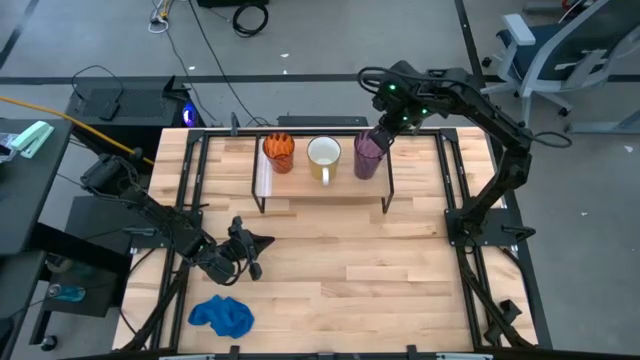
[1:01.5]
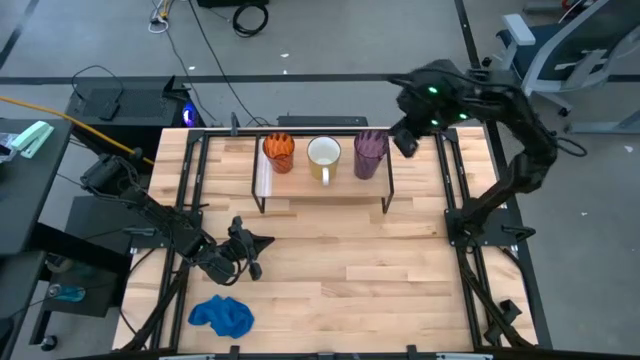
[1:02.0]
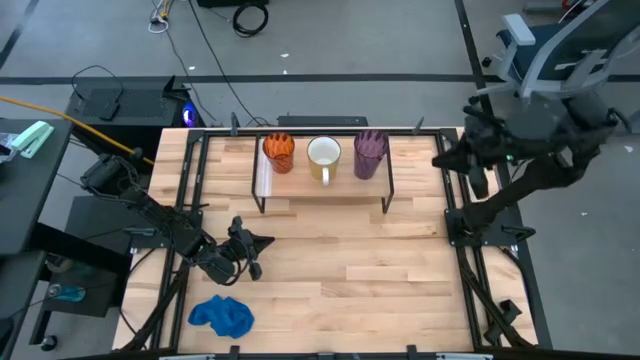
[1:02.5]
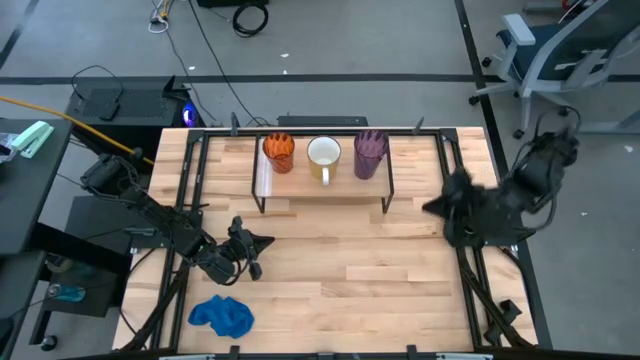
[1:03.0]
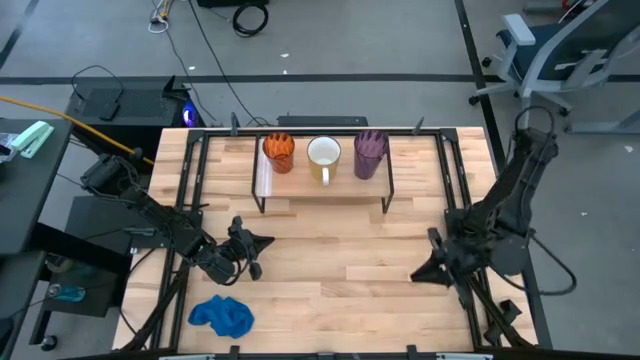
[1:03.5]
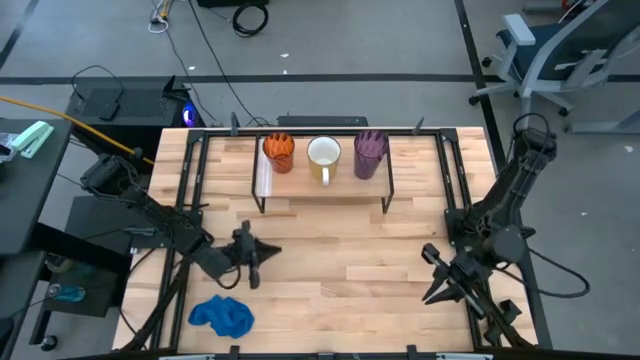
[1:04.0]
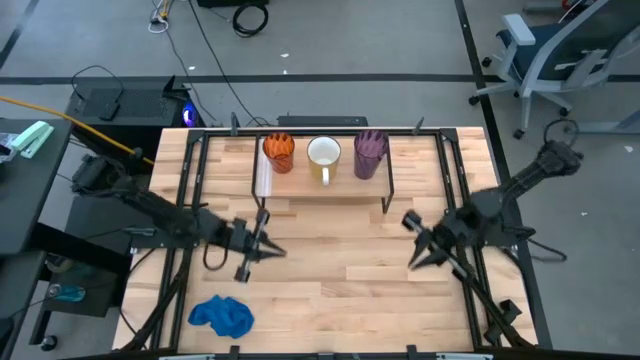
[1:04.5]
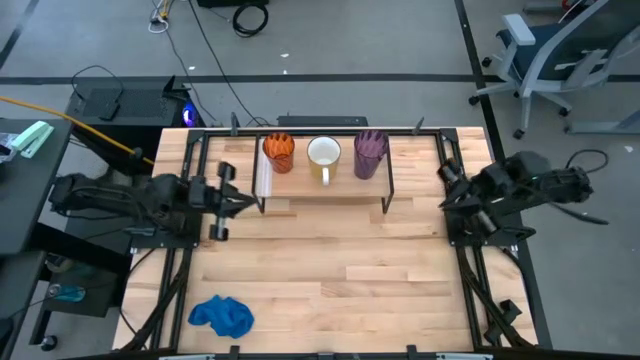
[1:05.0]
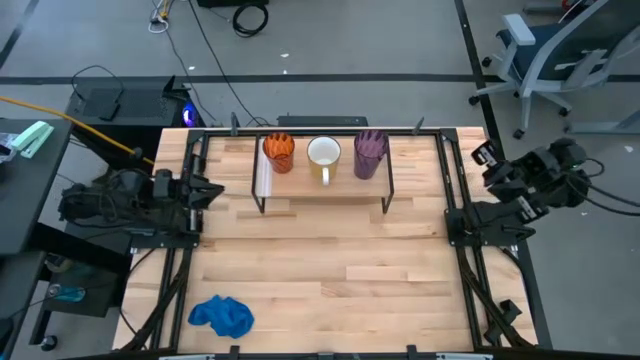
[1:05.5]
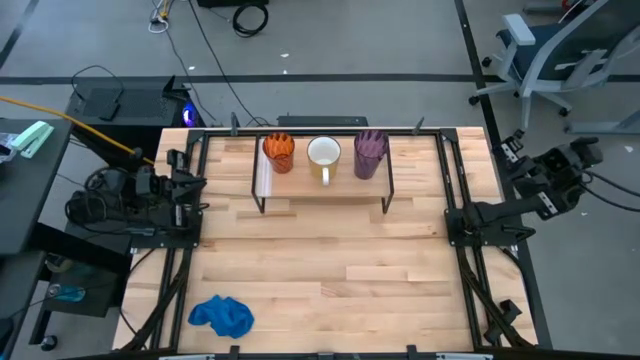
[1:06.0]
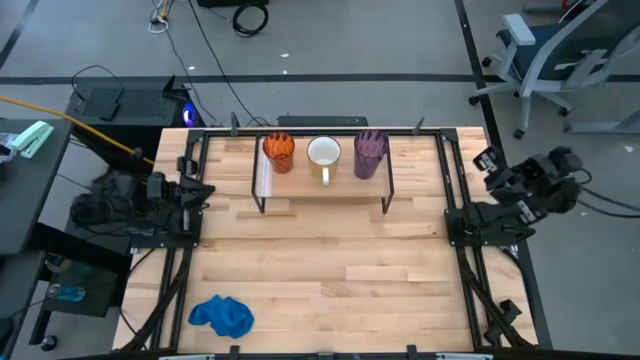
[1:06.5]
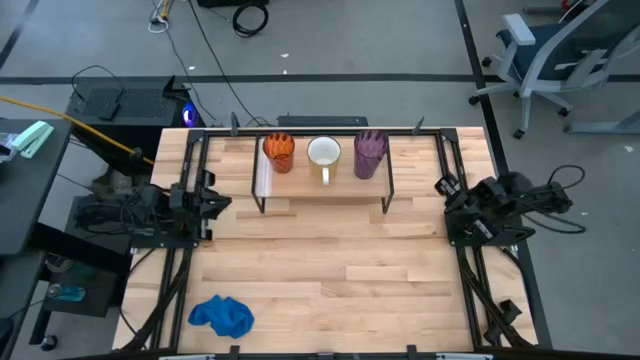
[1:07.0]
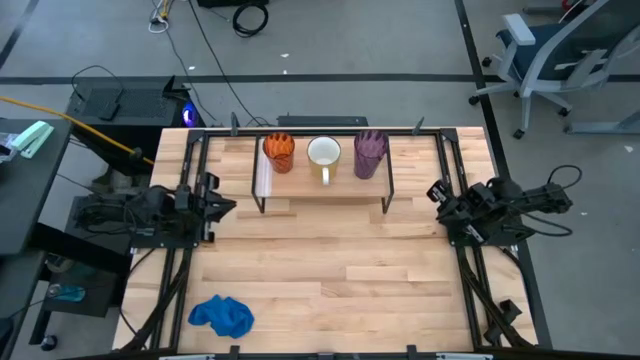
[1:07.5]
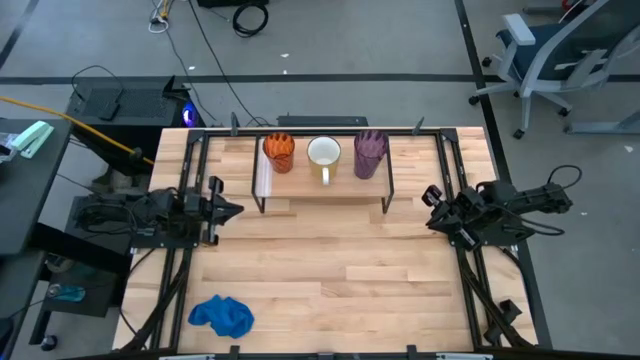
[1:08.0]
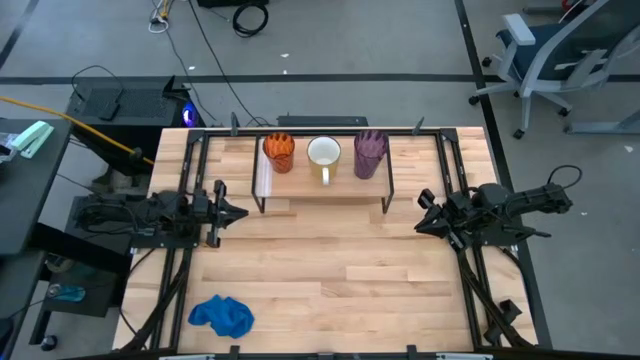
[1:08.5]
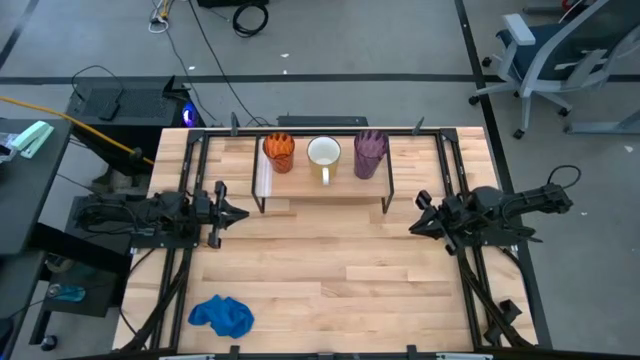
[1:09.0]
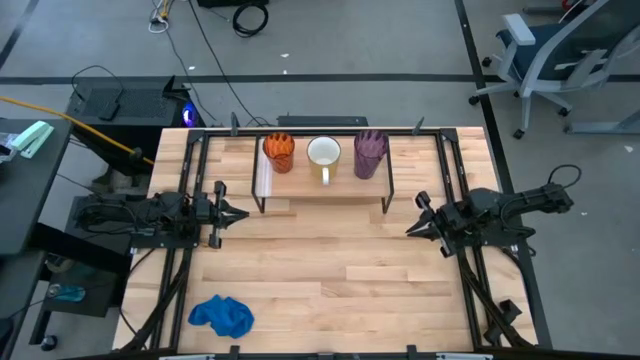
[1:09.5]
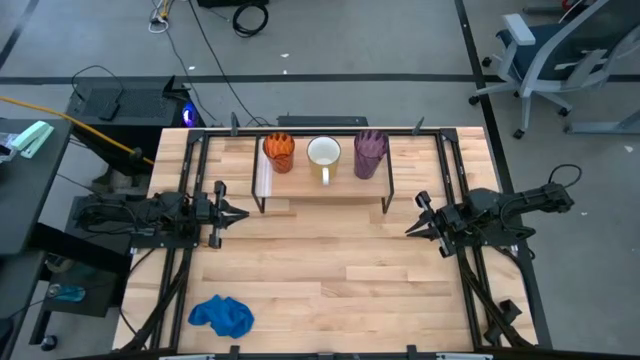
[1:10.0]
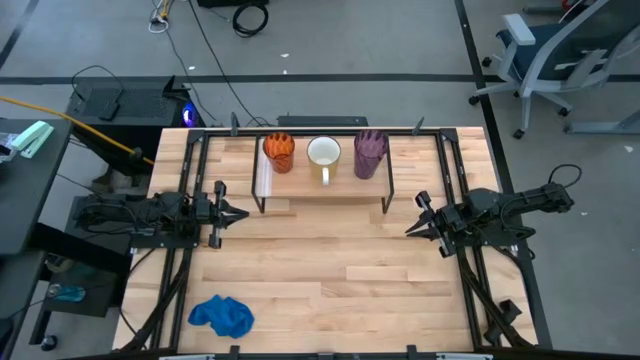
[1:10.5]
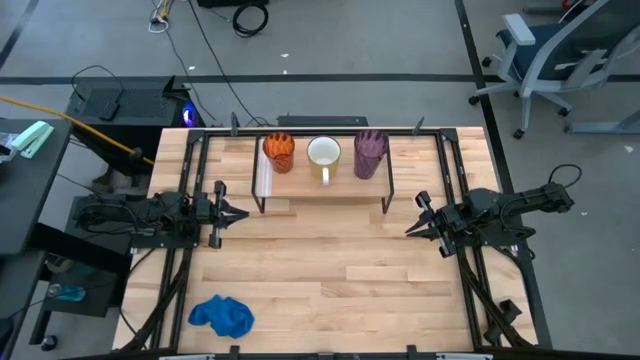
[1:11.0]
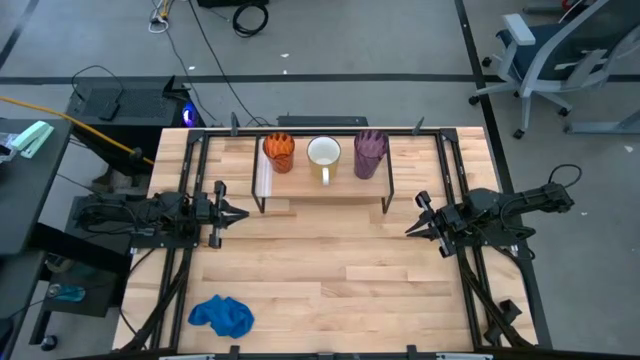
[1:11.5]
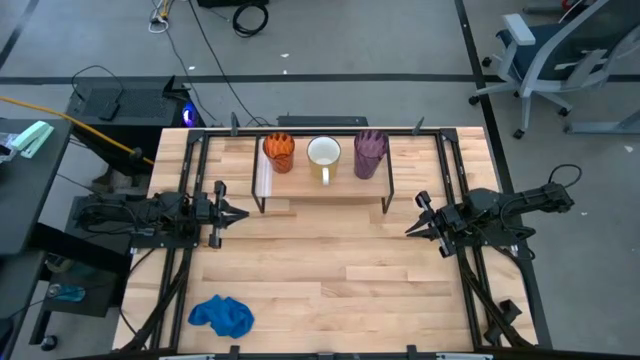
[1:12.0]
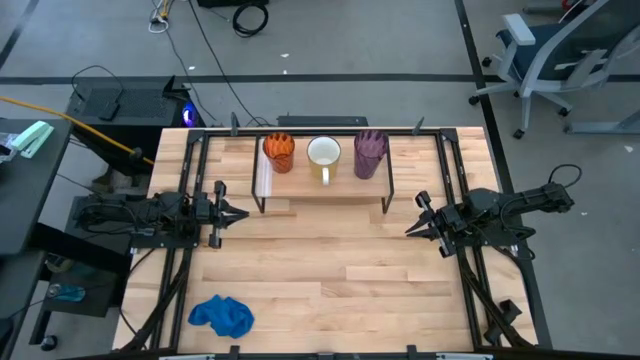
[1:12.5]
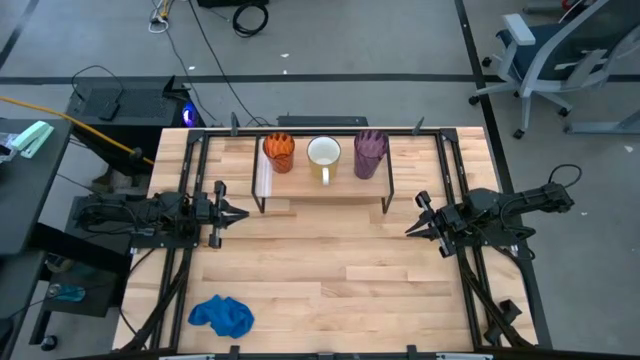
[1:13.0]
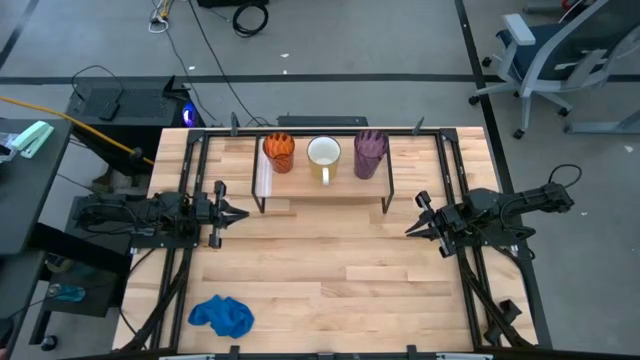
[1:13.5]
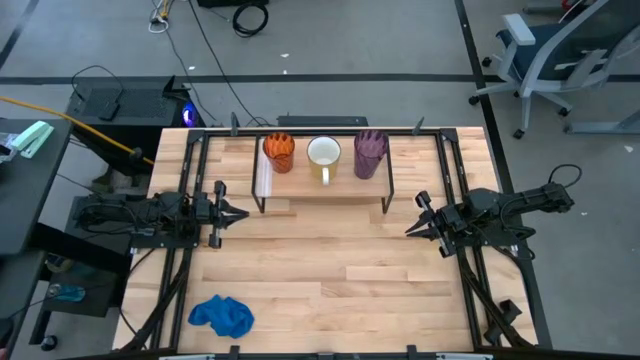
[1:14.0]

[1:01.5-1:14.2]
Task: Stack small to large cups/mugs on shelf
Return to Home Position

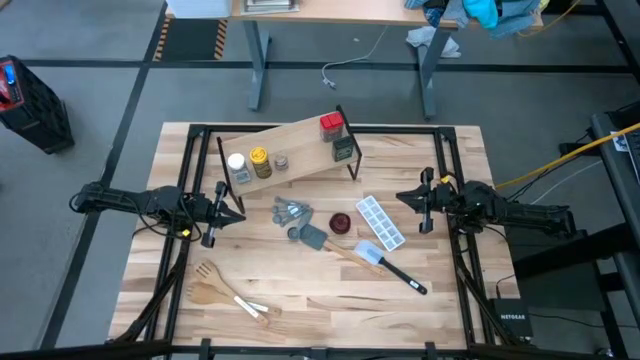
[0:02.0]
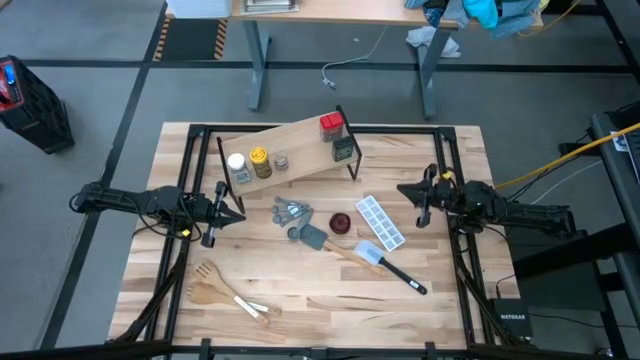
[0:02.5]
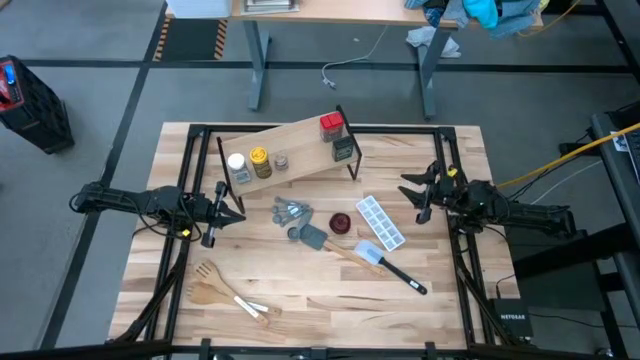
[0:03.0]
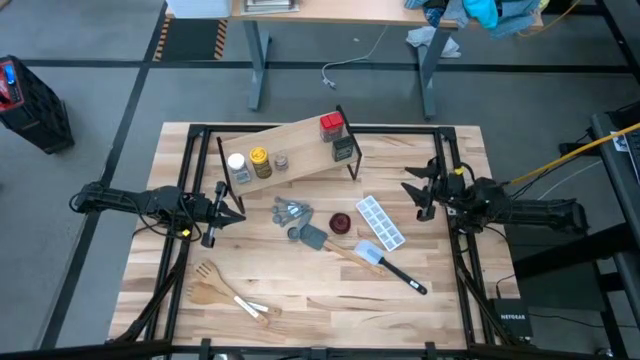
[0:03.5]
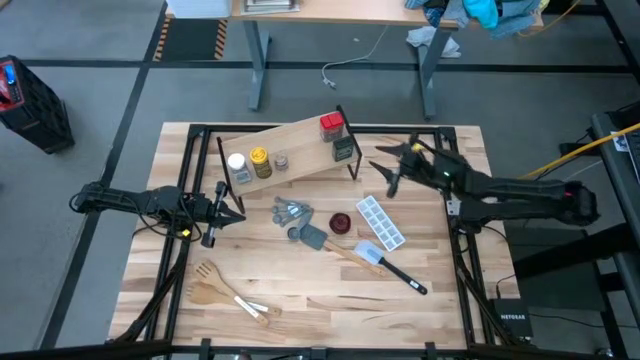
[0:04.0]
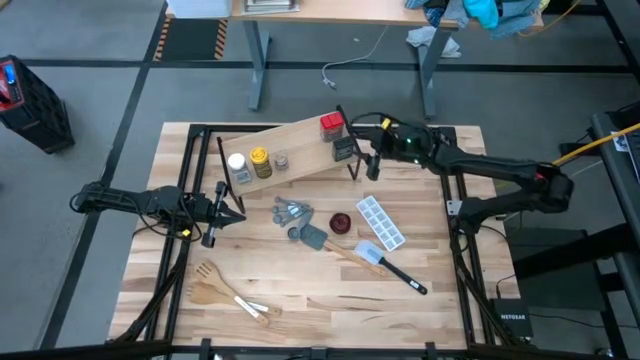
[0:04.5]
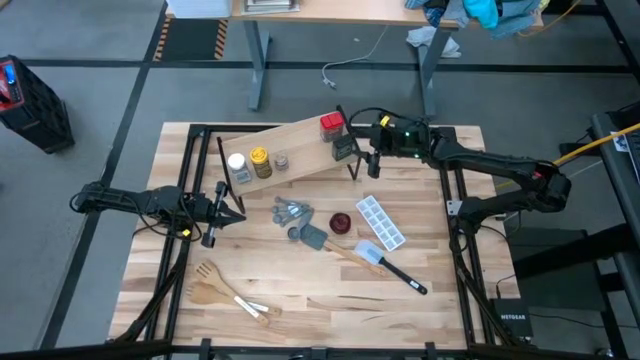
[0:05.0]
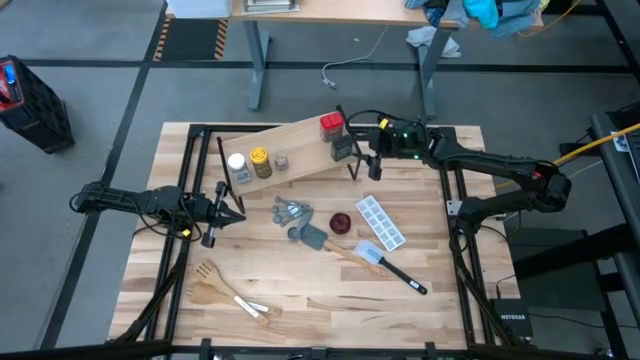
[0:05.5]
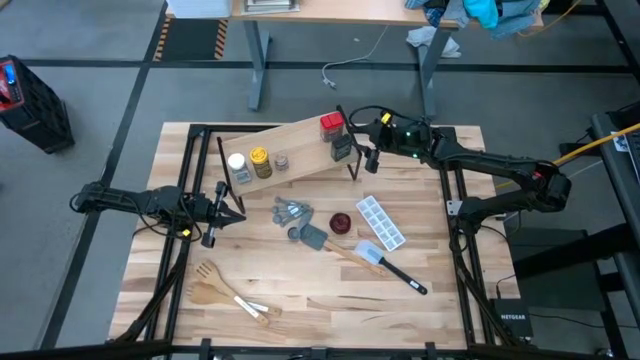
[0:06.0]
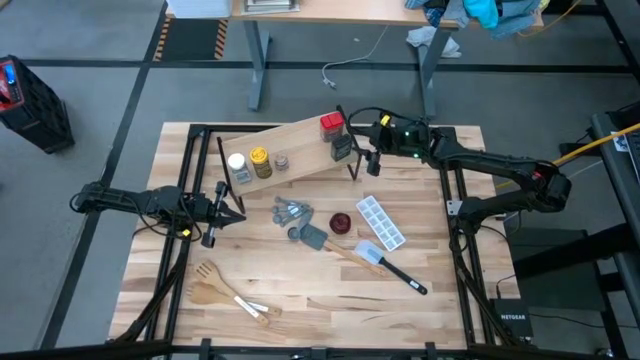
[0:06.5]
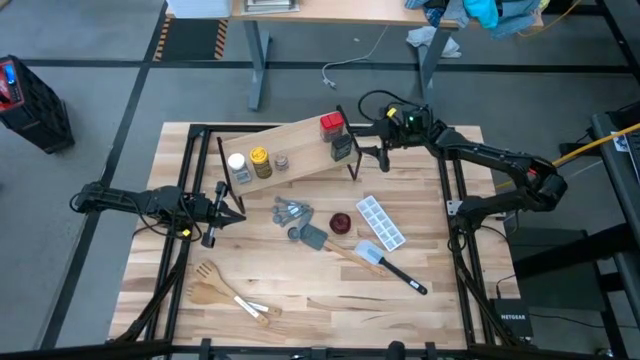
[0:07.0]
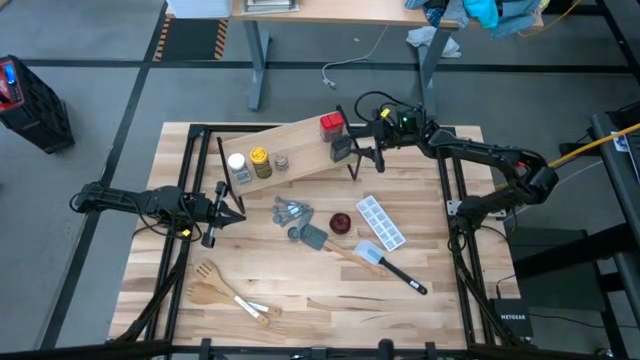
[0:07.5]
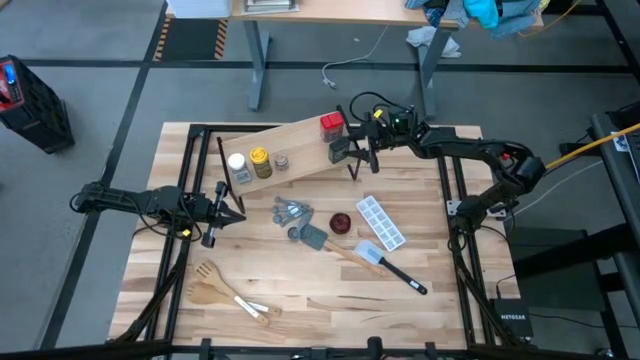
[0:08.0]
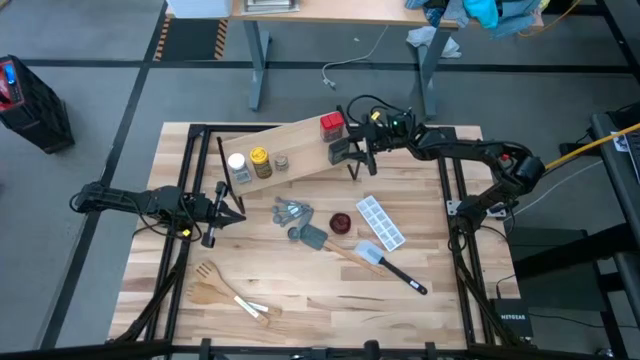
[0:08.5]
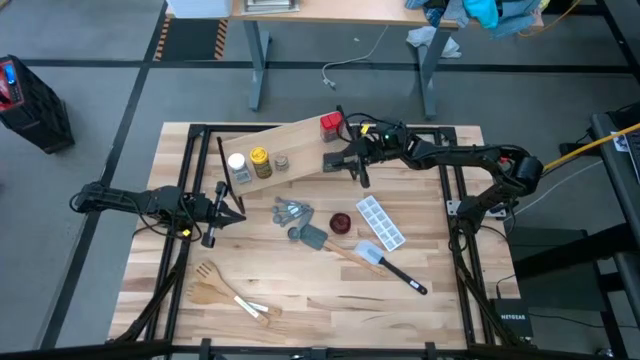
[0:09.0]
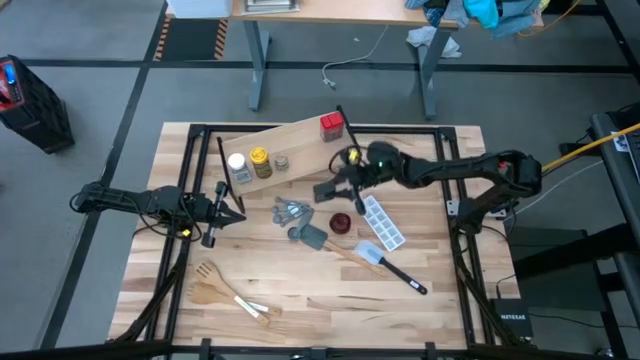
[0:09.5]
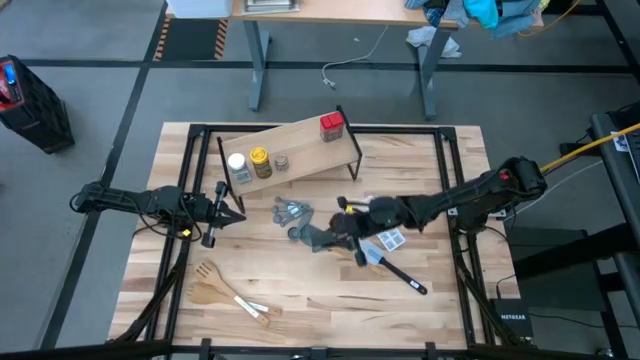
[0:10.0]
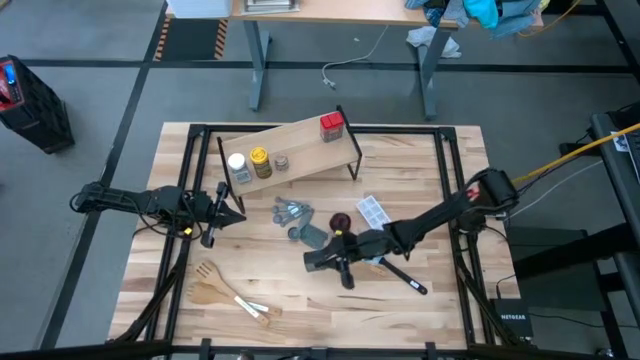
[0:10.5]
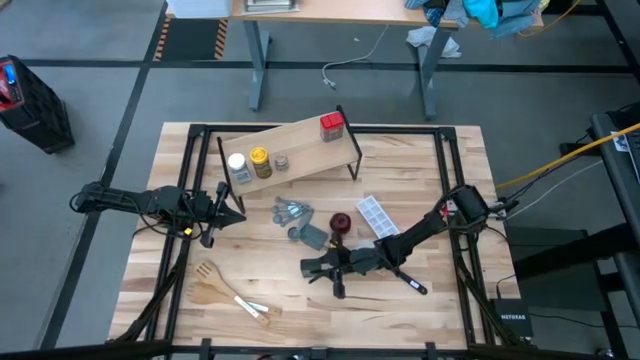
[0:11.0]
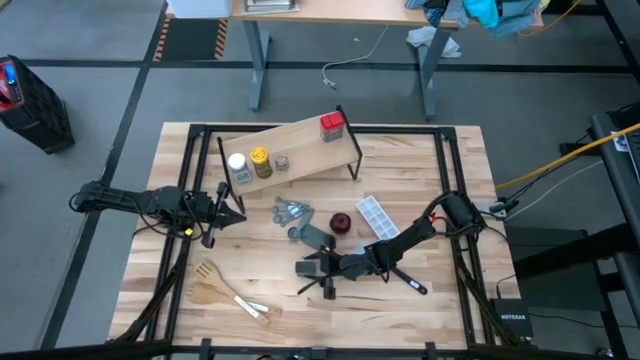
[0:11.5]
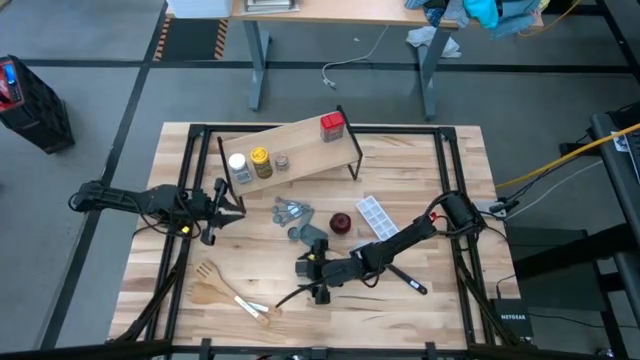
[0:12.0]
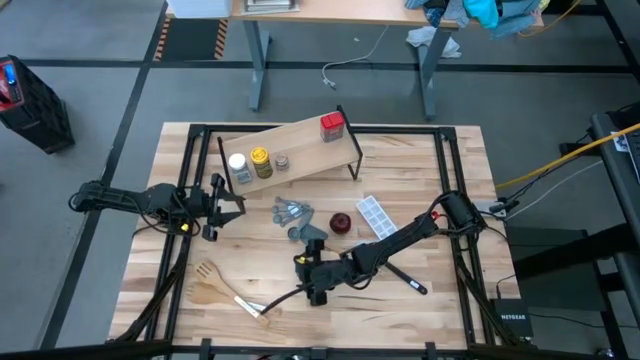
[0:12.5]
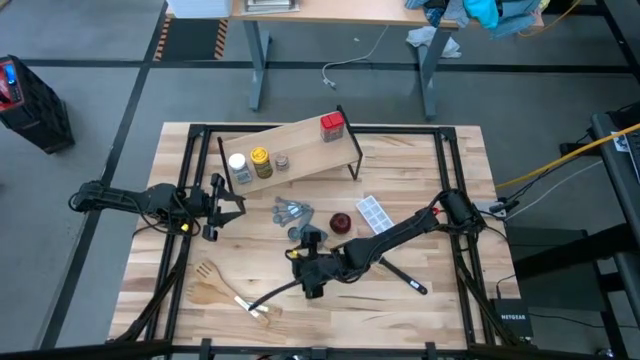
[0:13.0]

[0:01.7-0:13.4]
Task: Shelf spices
Remove the green seasoning can from the shelf
